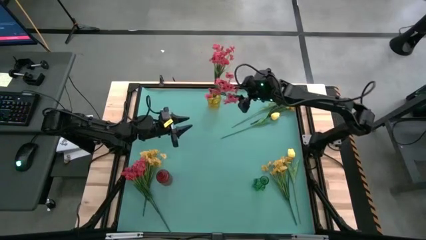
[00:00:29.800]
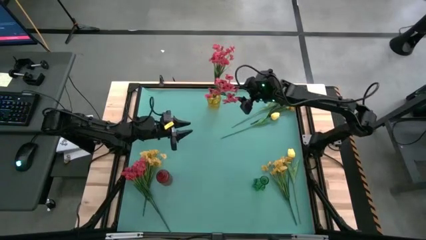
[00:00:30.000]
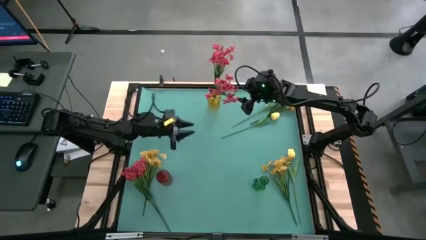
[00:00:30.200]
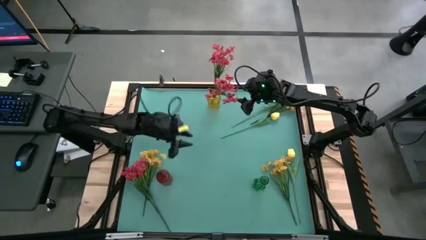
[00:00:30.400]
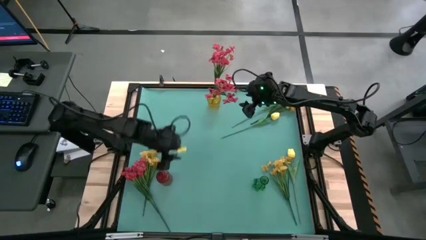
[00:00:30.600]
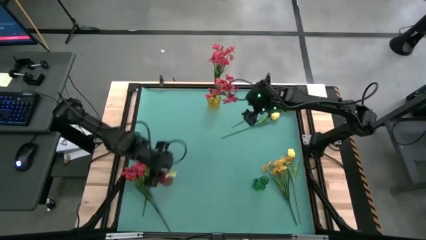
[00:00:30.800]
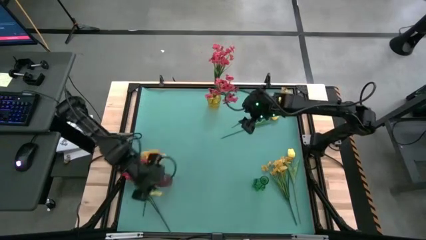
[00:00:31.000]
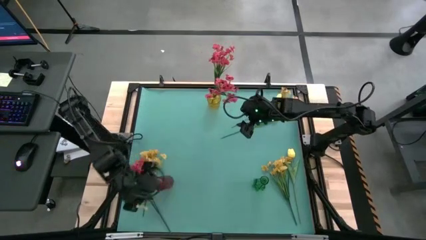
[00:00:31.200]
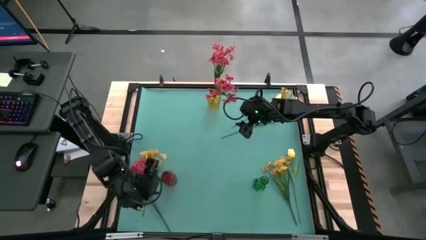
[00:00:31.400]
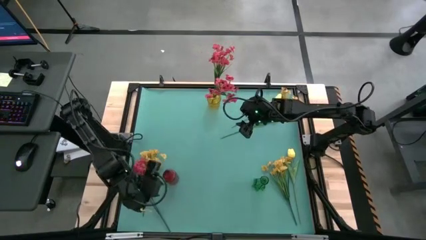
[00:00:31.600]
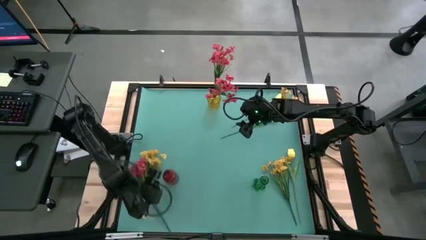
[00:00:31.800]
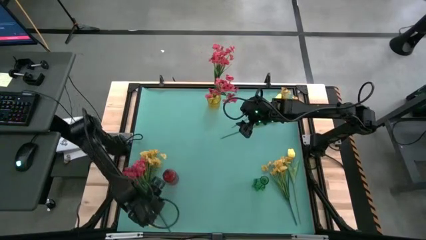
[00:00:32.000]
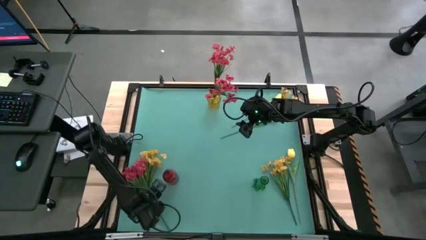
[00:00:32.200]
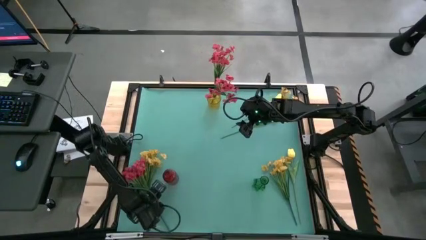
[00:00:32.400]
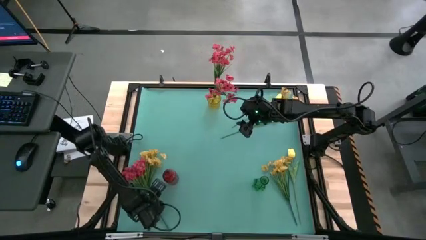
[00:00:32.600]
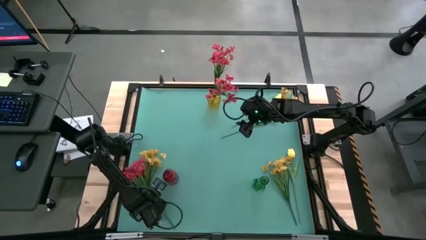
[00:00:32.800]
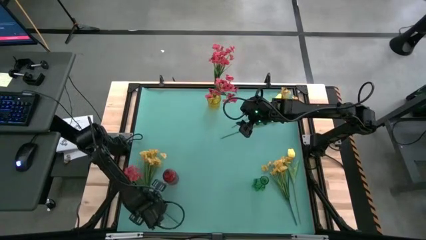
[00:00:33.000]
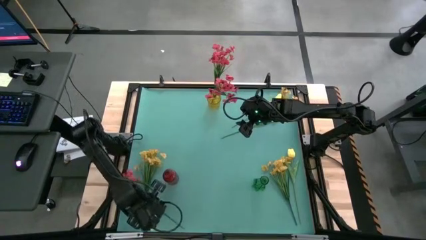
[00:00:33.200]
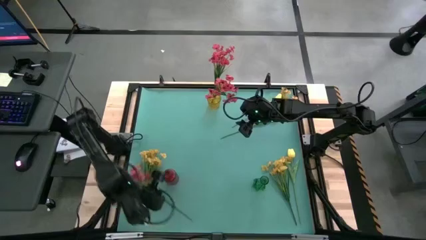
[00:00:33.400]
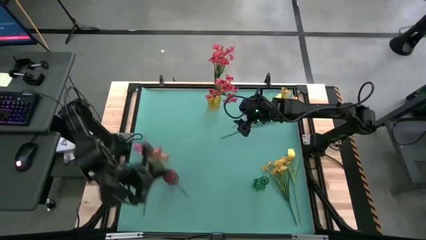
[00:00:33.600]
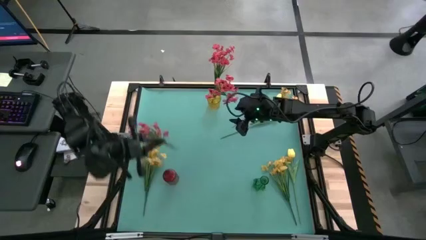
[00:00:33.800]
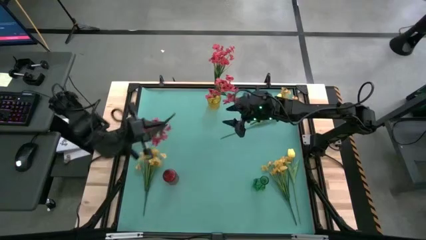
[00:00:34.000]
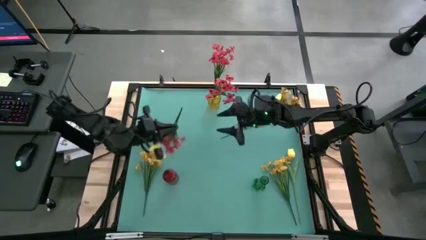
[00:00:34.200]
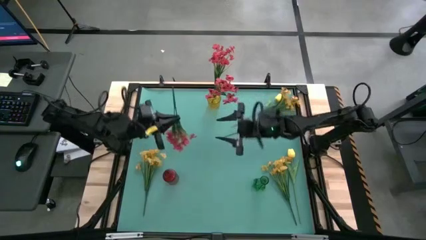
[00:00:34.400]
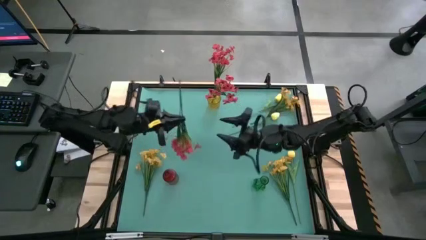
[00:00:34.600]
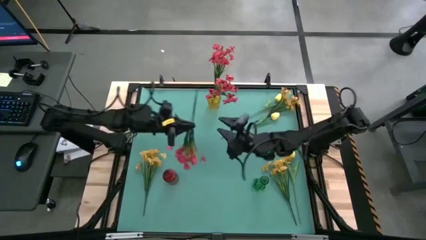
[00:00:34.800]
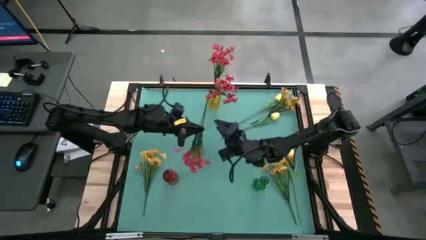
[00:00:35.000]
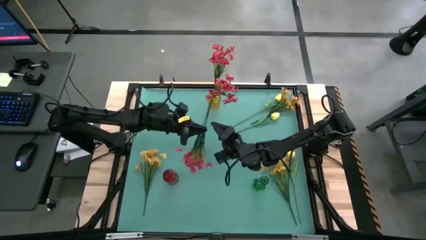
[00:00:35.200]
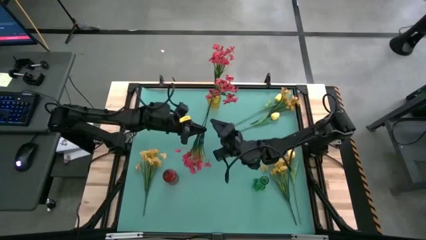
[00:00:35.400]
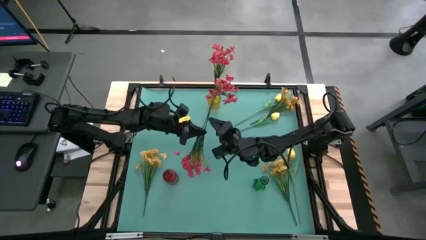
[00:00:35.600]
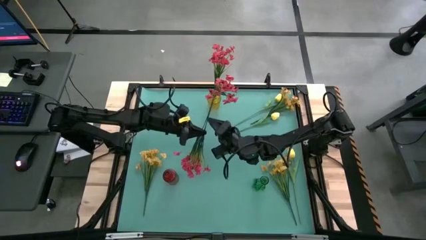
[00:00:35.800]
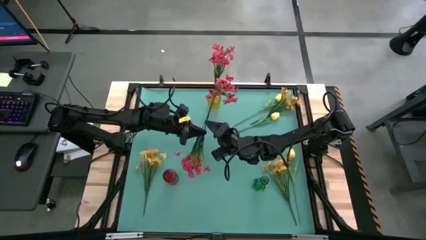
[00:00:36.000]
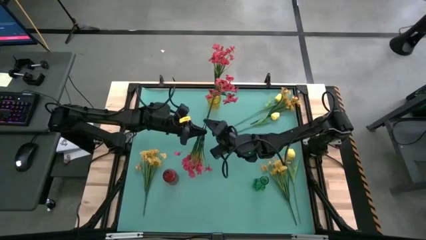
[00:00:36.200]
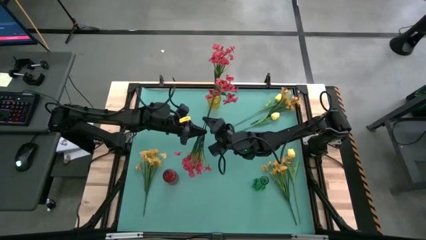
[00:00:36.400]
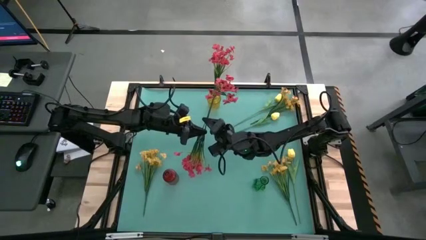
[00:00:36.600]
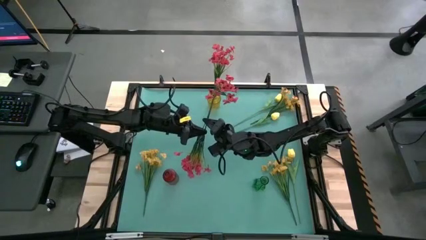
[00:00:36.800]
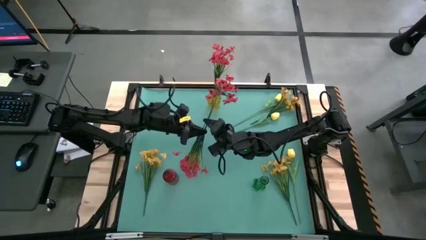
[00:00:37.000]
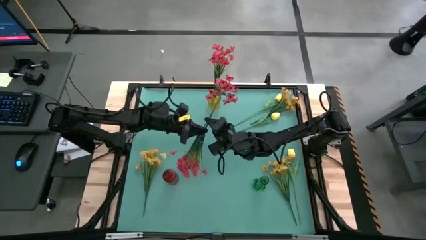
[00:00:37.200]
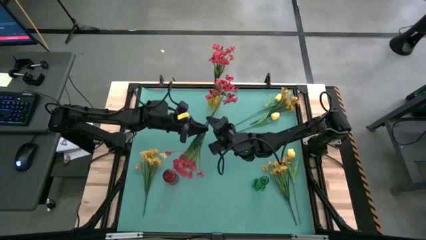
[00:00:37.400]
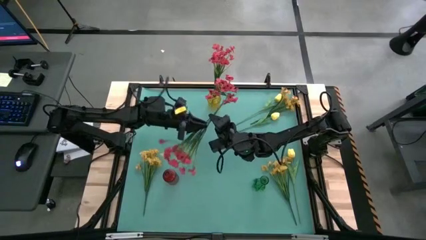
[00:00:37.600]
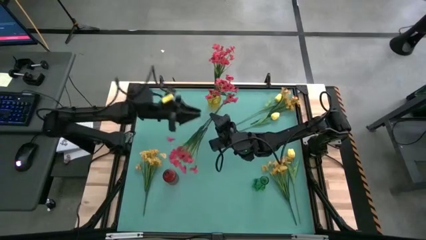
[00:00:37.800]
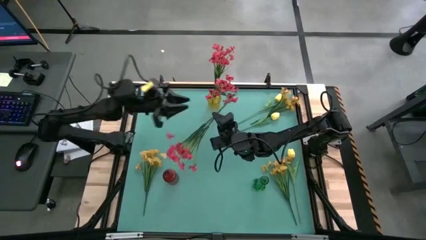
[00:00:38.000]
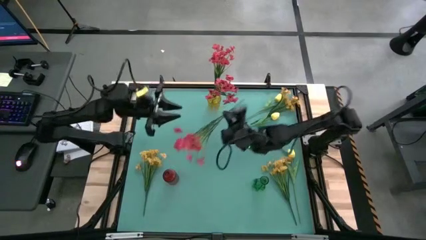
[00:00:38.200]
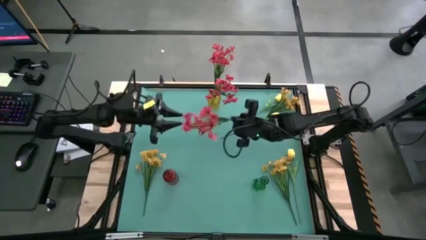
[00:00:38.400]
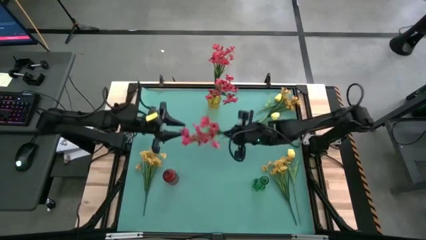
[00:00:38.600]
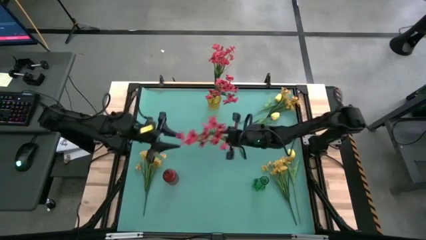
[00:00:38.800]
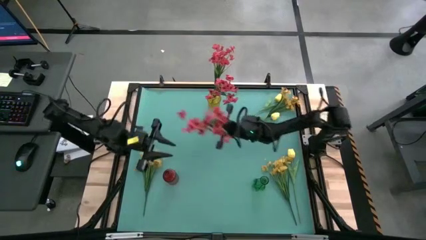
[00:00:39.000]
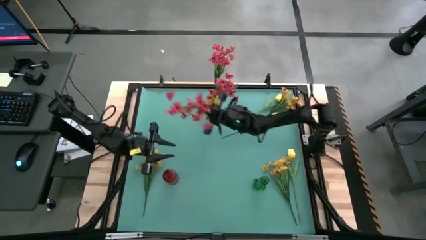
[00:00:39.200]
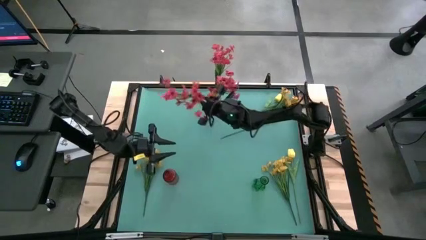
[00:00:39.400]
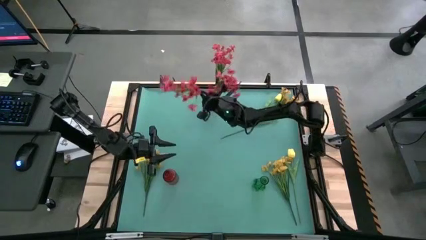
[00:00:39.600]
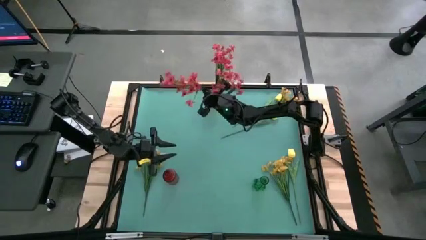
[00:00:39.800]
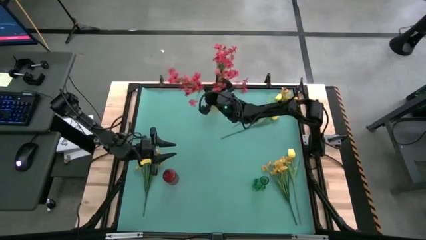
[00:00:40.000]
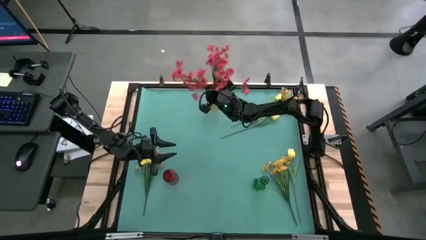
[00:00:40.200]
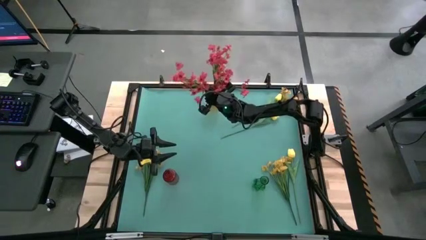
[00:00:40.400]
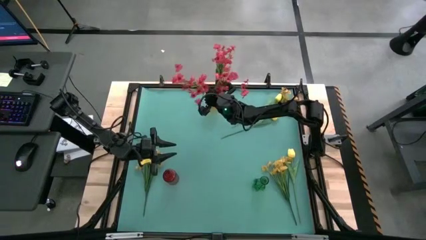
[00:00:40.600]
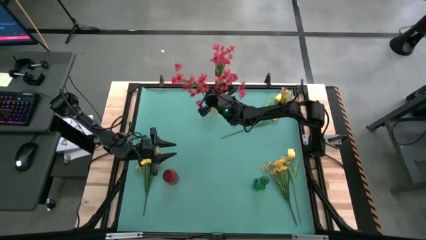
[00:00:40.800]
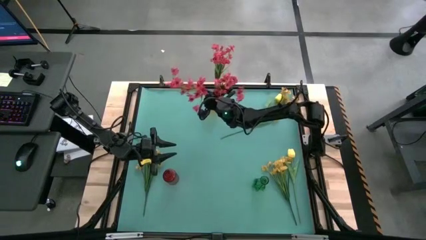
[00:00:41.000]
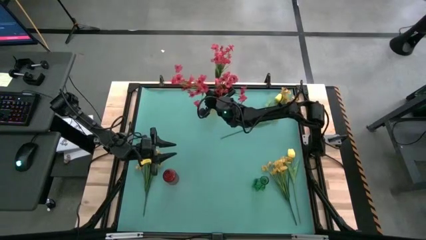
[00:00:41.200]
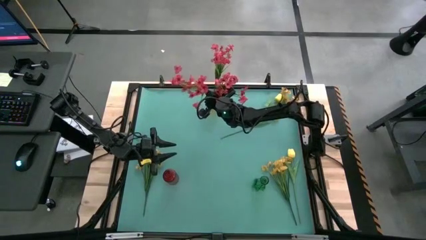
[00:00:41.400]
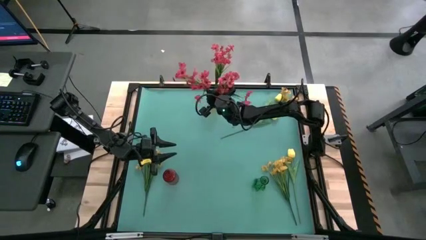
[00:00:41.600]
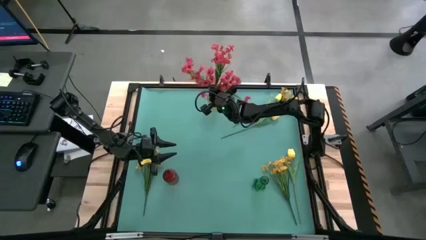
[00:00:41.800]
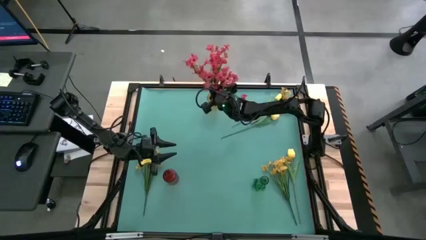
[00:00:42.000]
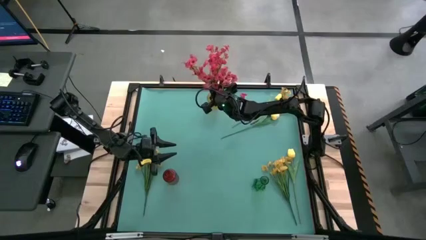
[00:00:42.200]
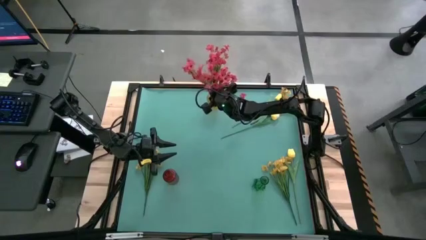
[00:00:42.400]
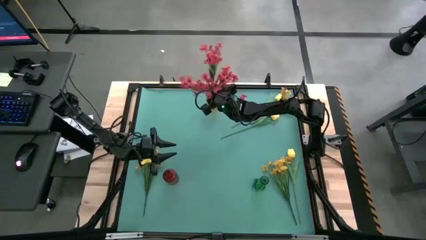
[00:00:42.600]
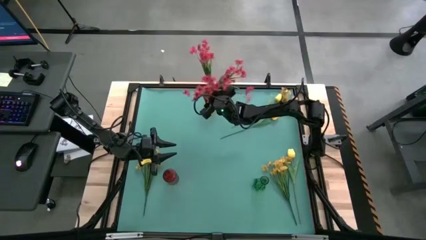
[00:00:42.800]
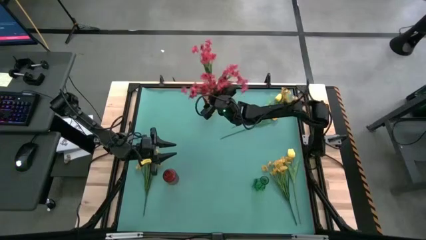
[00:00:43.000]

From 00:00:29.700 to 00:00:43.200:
Task: Sort flowers into vase by color
Put the red flowers into the yellow vase
